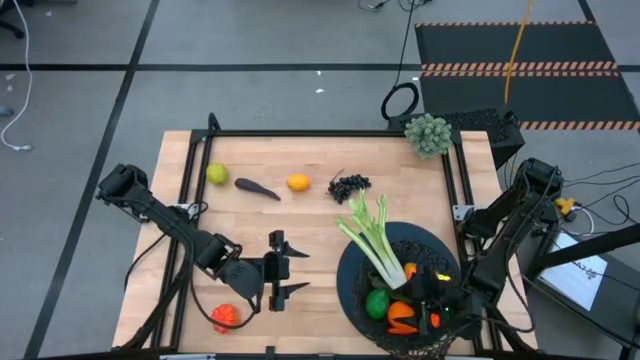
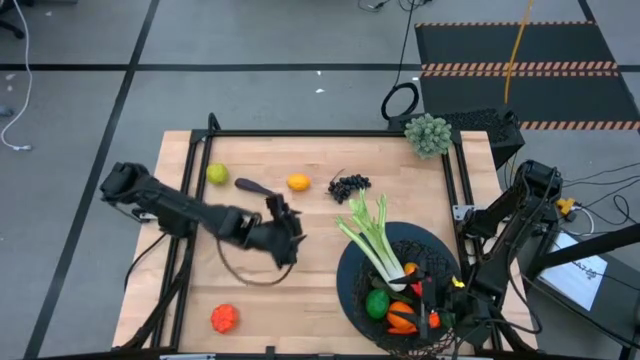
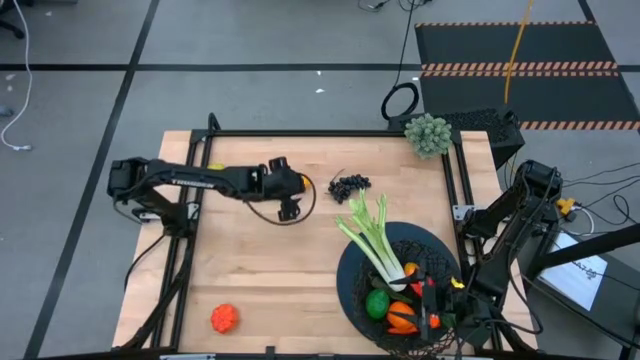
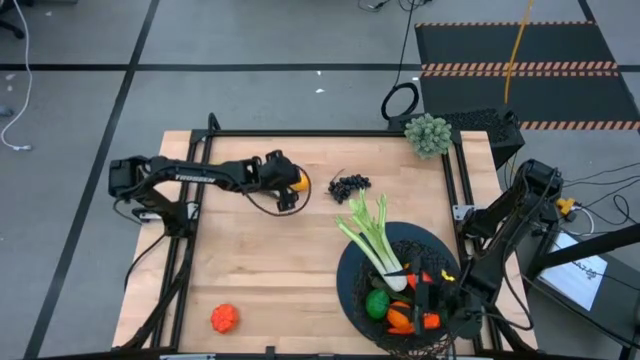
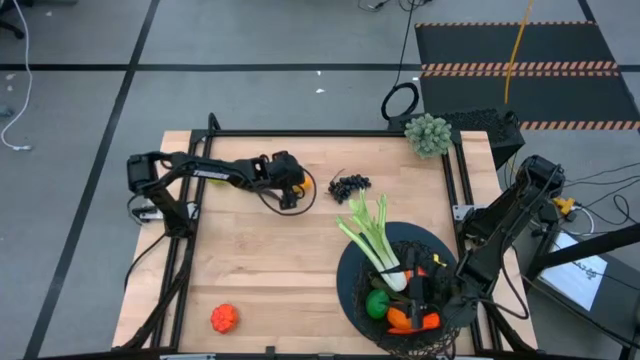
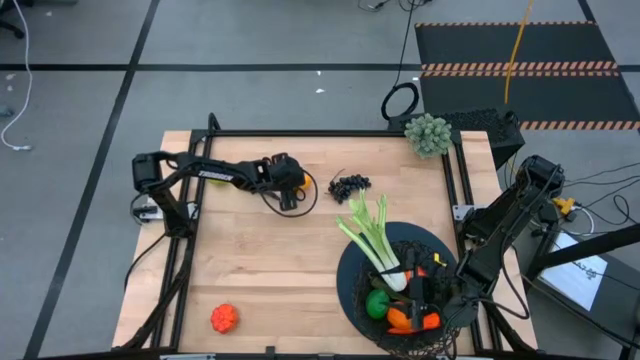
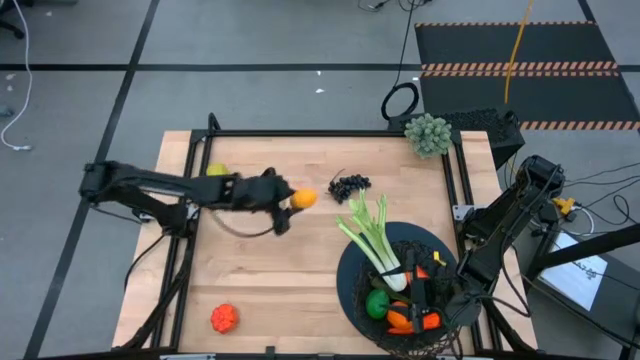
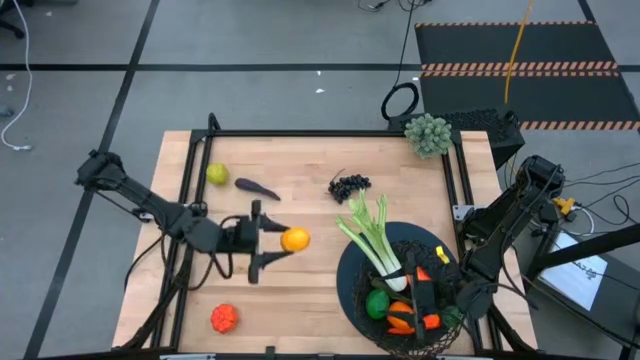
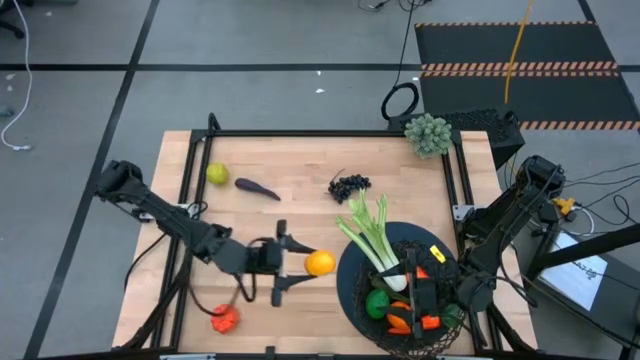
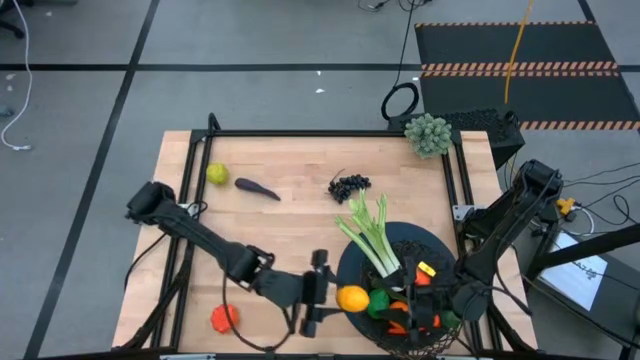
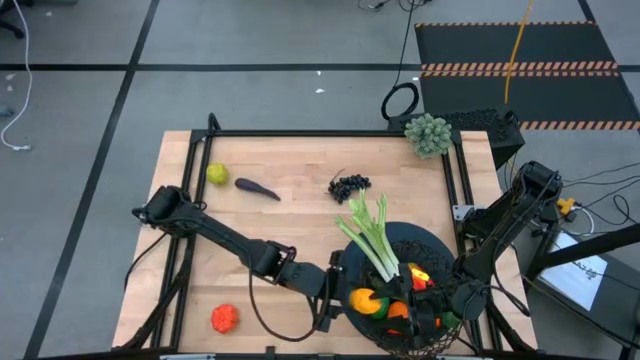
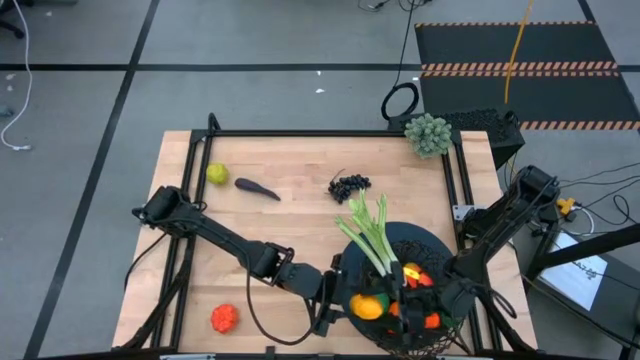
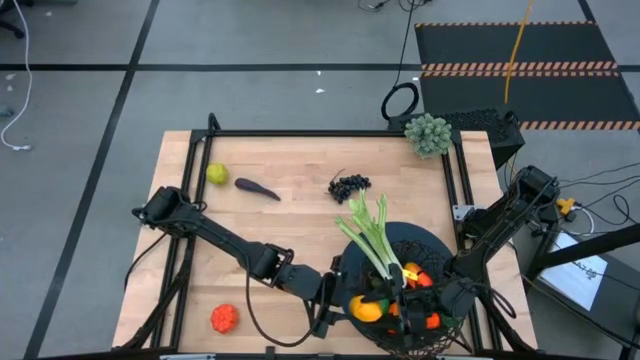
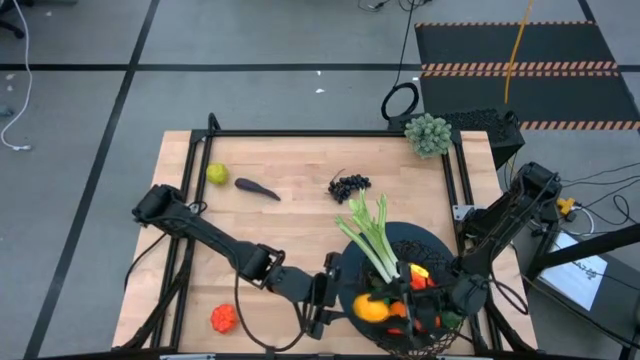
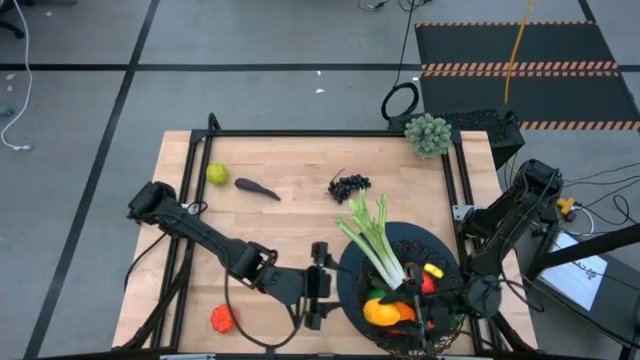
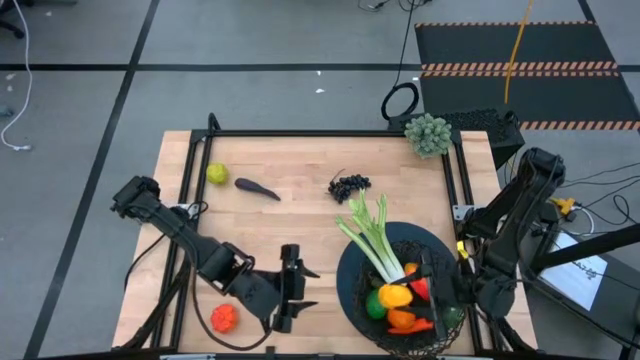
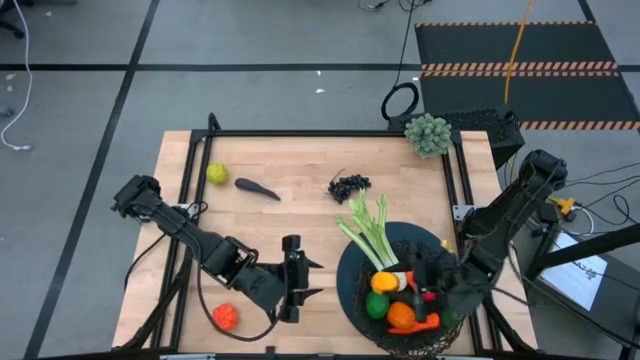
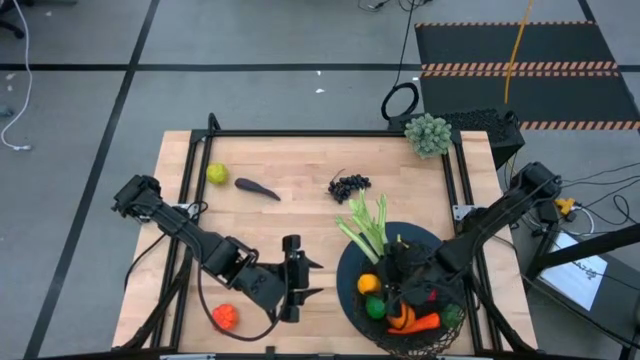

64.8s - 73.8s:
Task: Build produce basket
Put the lemon into the wire basket

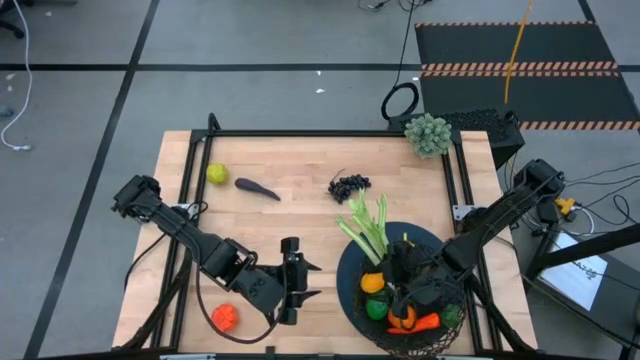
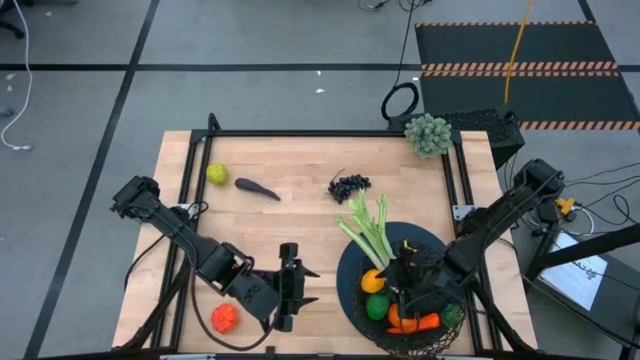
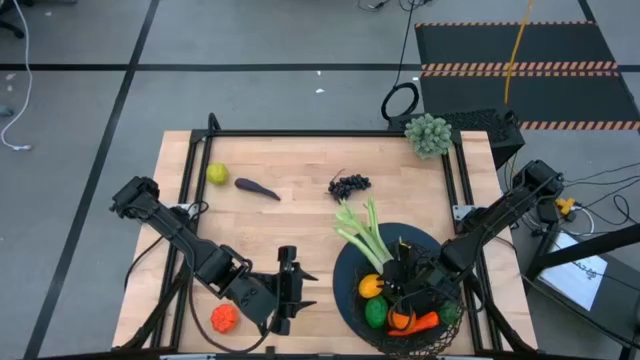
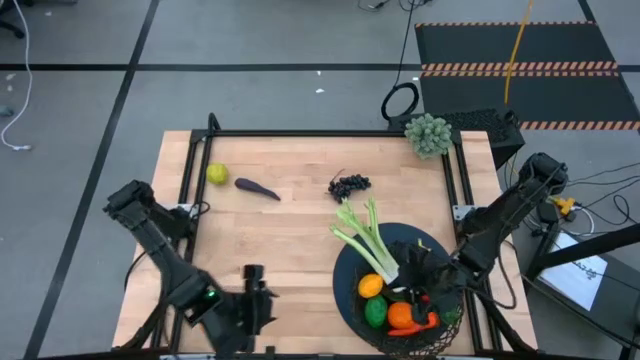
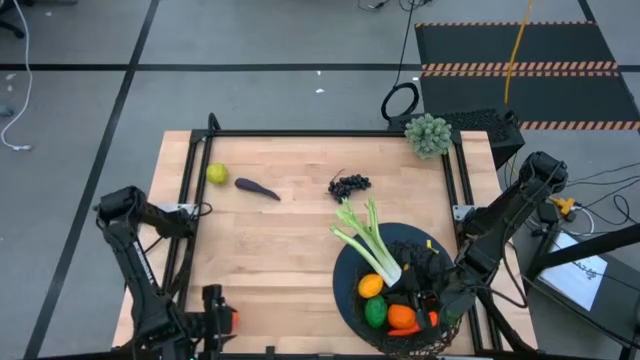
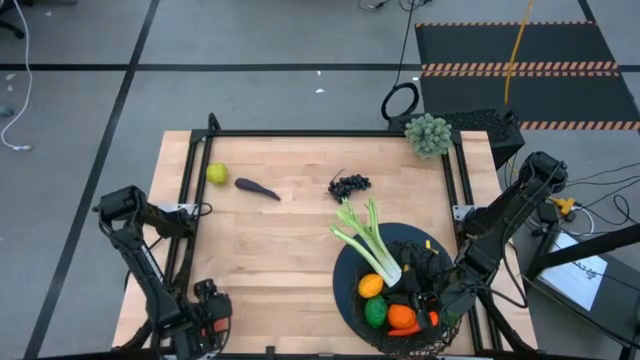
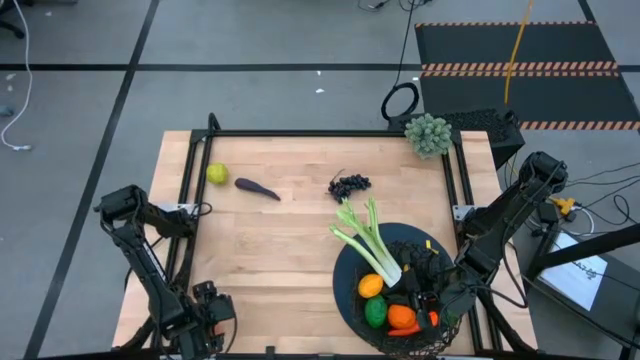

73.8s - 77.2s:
Put the pumpkin into the wire basket

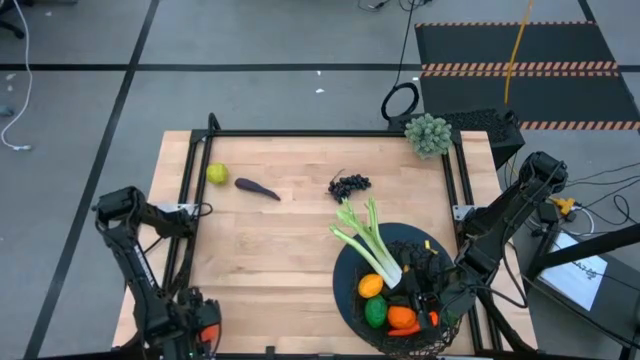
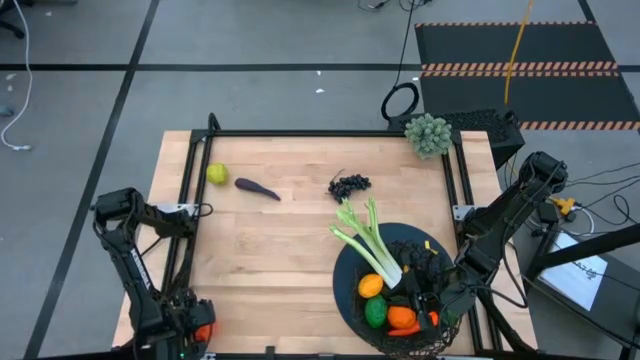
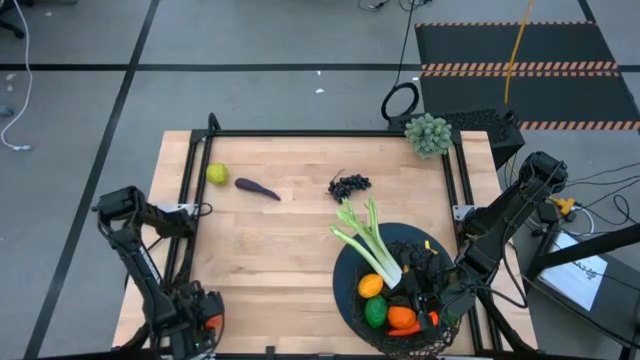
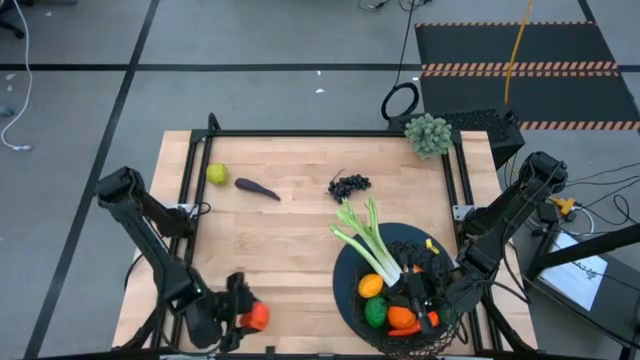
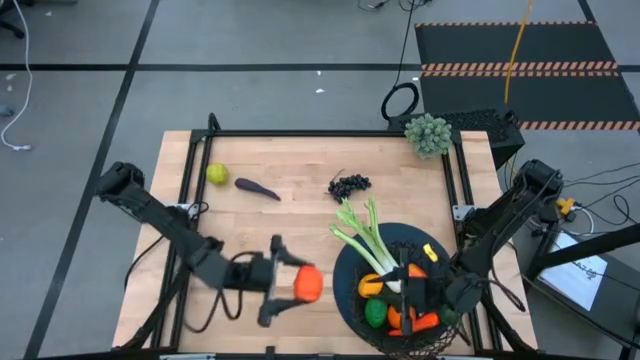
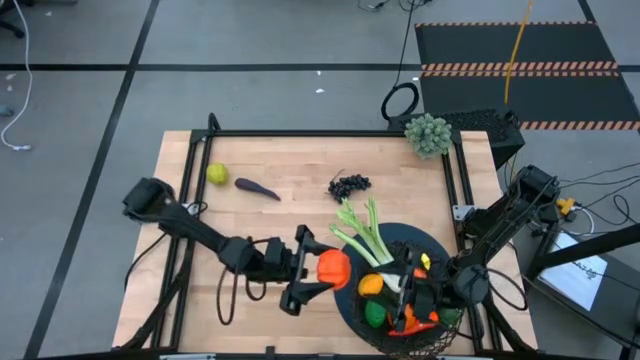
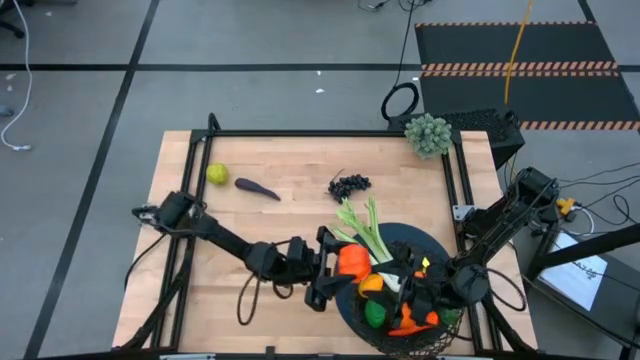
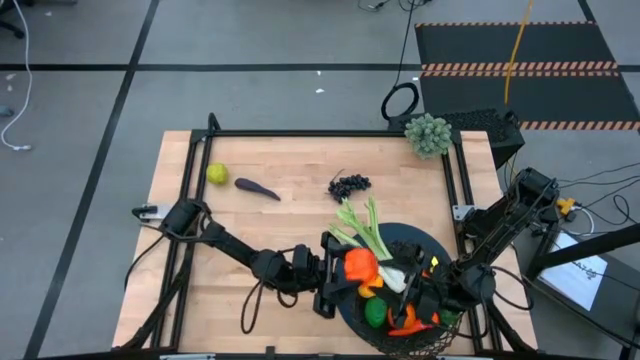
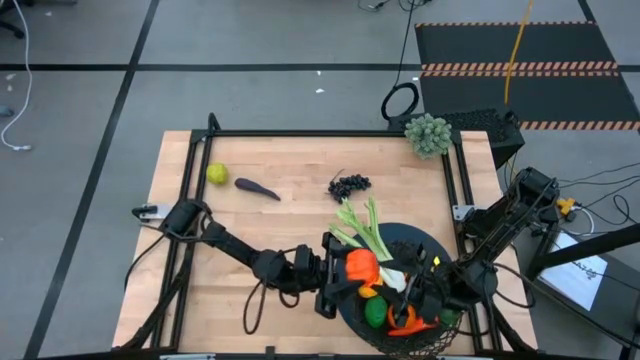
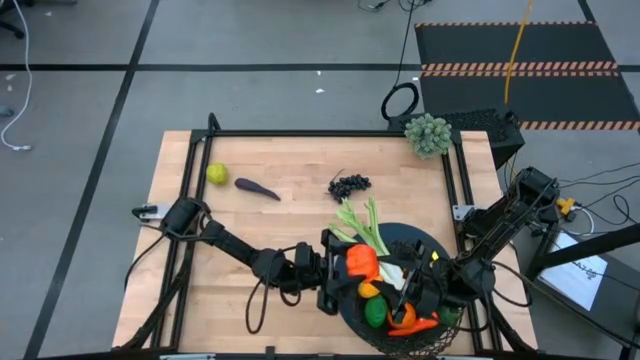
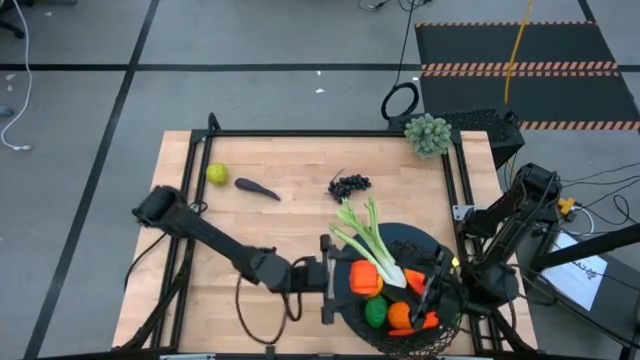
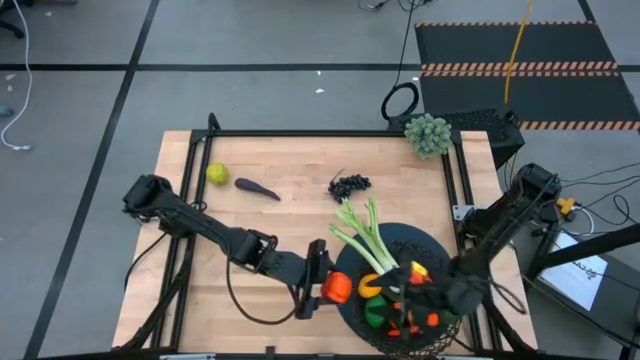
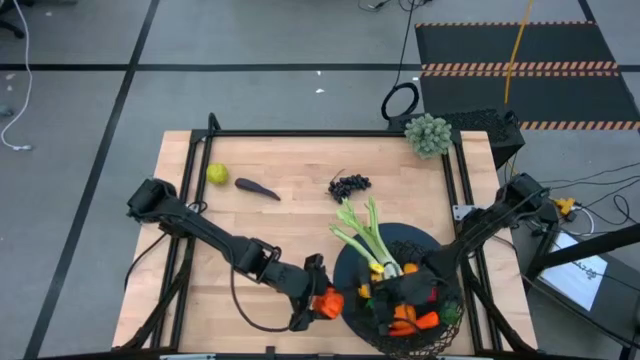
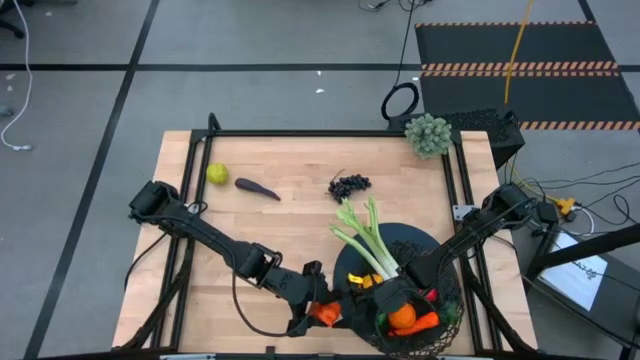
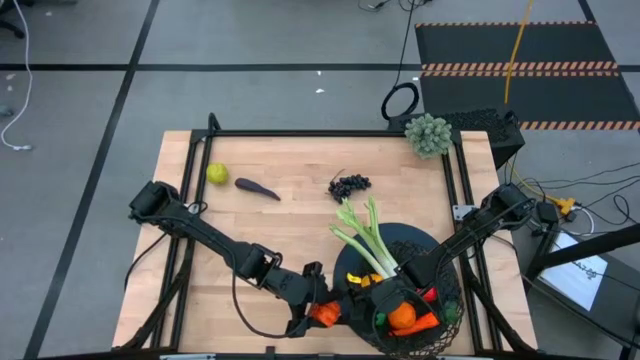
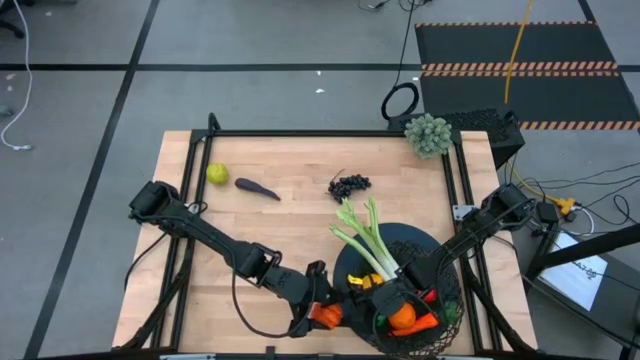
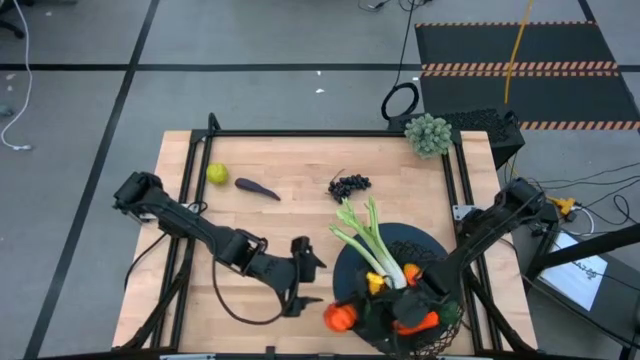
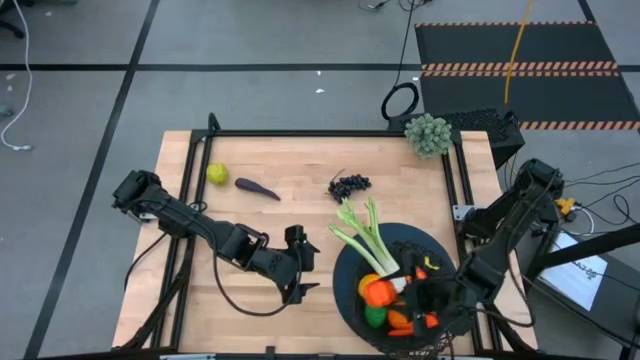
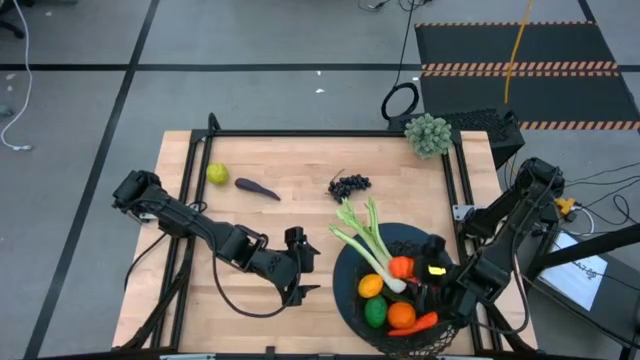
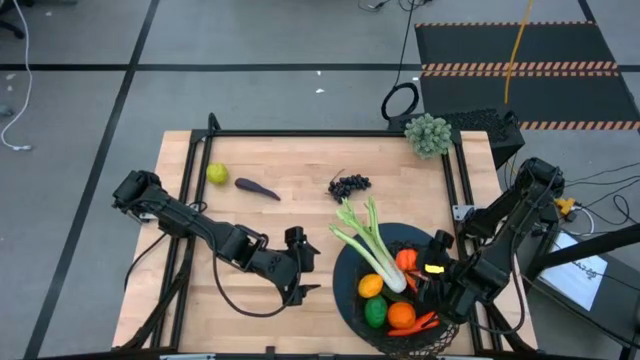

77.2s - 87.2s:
Put the pumpkin into the wire basket
